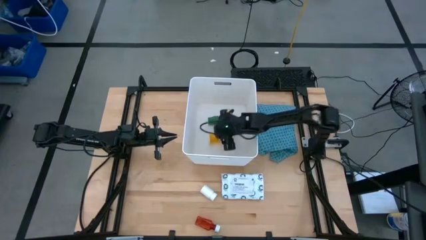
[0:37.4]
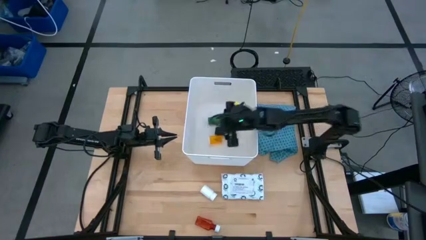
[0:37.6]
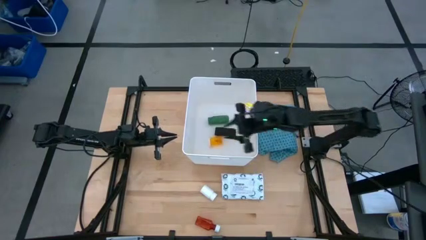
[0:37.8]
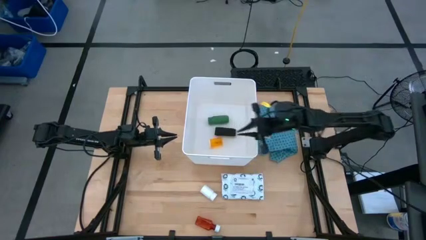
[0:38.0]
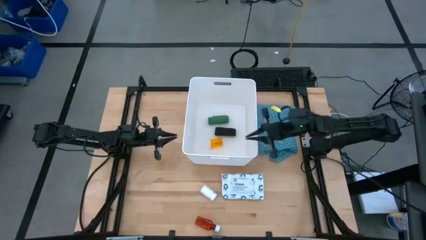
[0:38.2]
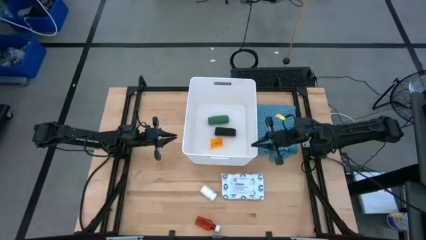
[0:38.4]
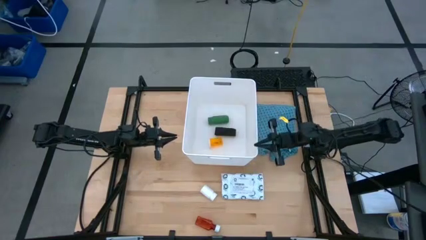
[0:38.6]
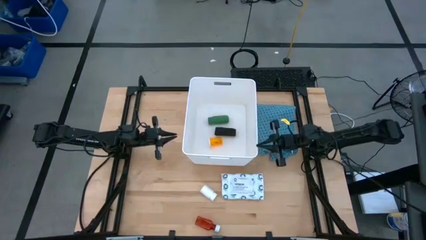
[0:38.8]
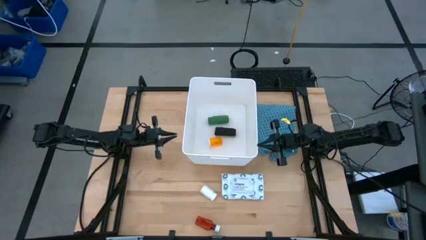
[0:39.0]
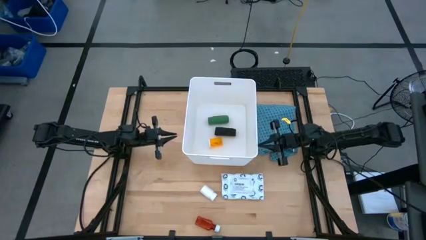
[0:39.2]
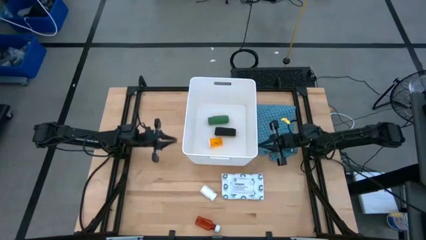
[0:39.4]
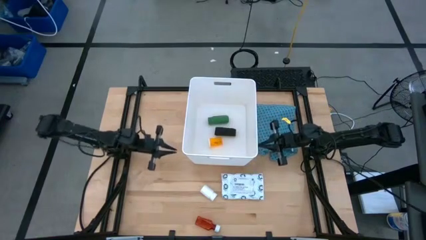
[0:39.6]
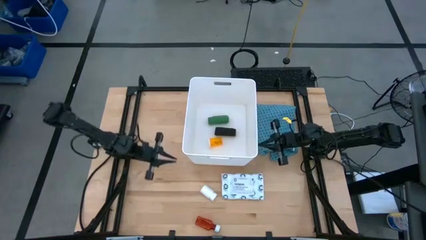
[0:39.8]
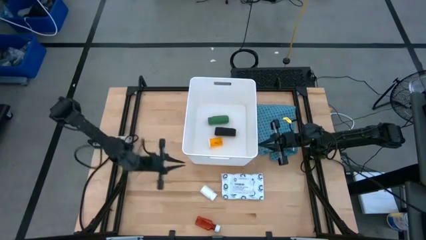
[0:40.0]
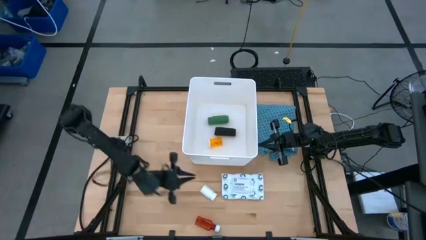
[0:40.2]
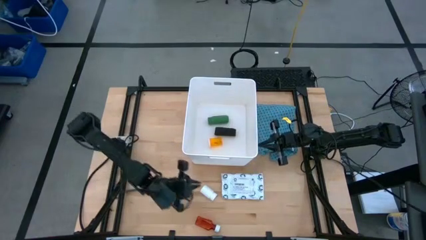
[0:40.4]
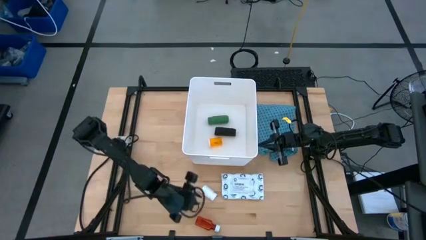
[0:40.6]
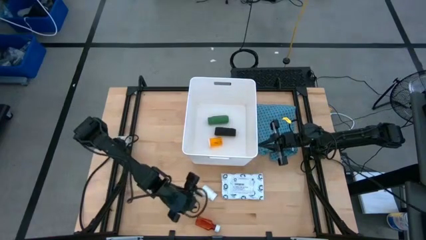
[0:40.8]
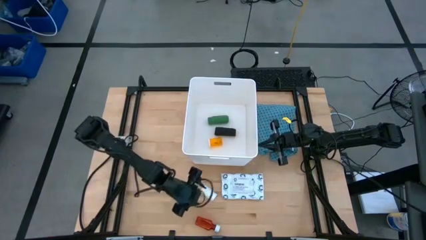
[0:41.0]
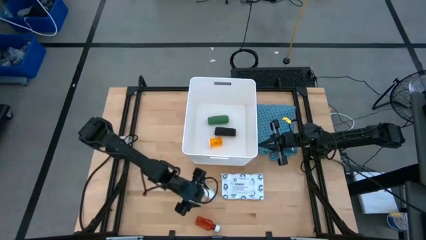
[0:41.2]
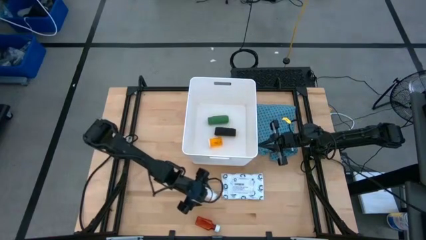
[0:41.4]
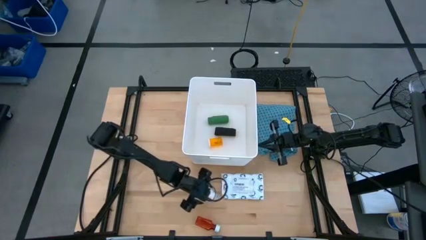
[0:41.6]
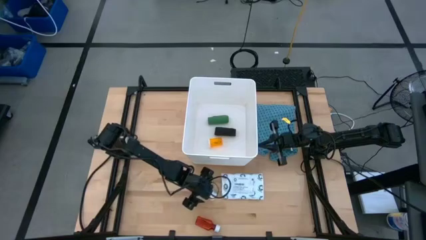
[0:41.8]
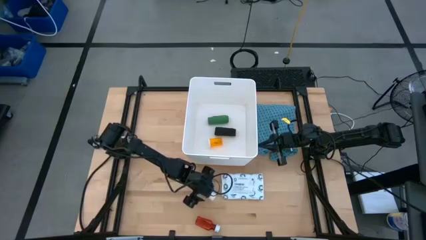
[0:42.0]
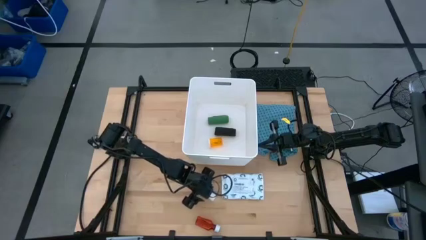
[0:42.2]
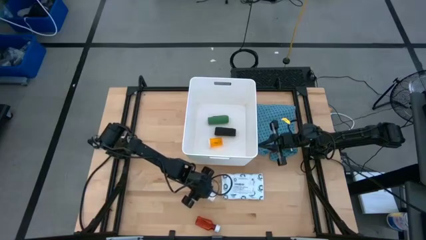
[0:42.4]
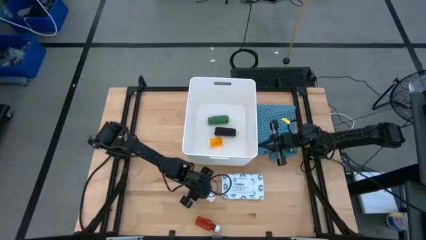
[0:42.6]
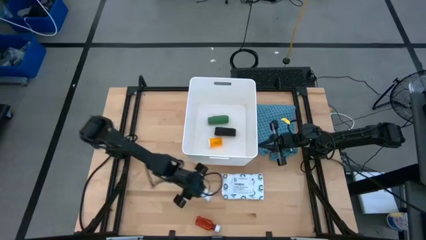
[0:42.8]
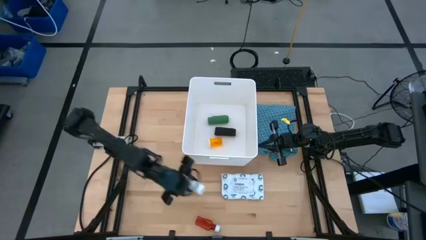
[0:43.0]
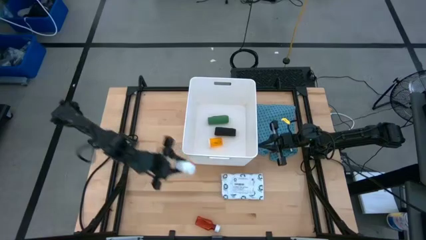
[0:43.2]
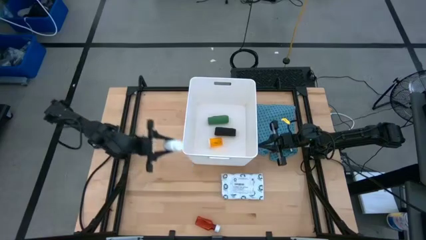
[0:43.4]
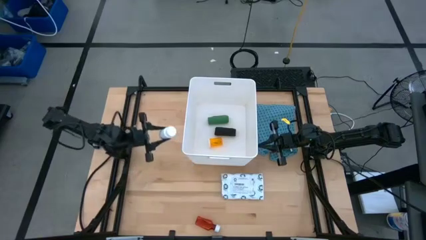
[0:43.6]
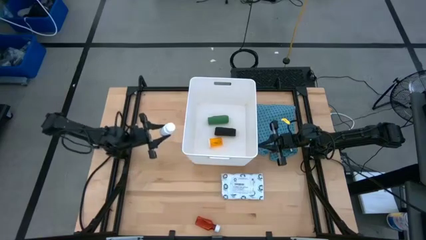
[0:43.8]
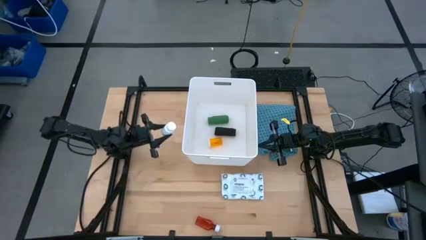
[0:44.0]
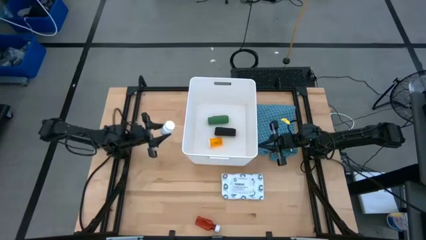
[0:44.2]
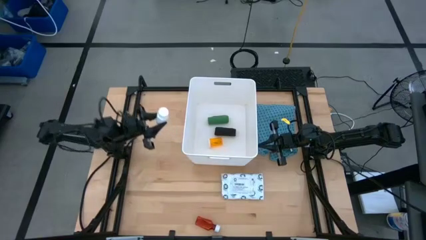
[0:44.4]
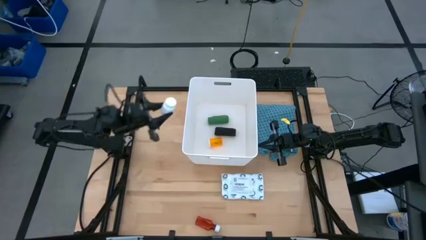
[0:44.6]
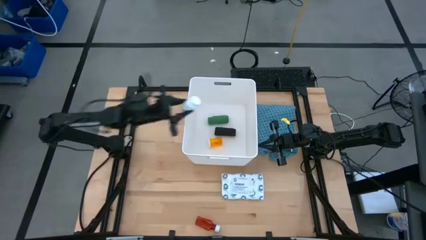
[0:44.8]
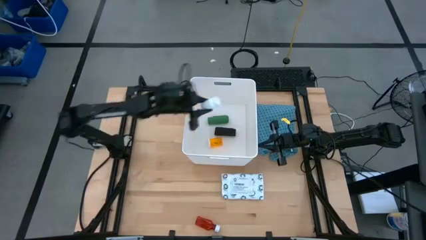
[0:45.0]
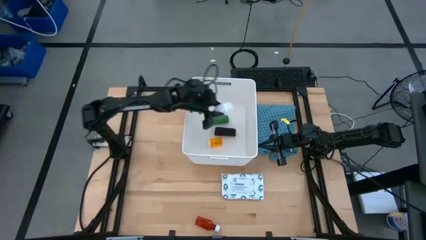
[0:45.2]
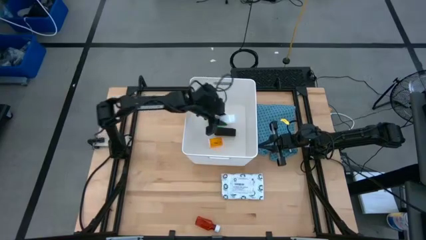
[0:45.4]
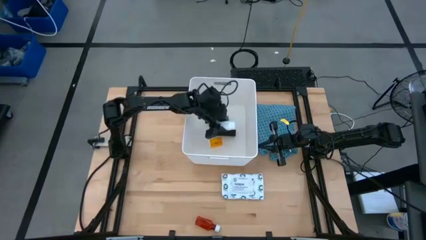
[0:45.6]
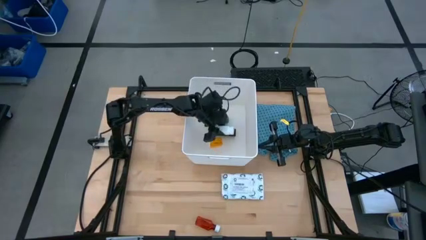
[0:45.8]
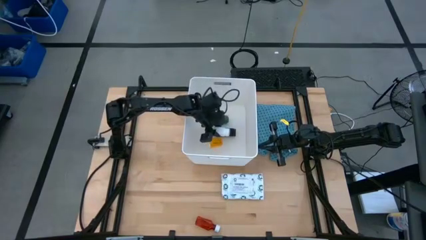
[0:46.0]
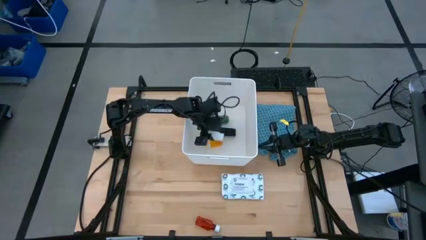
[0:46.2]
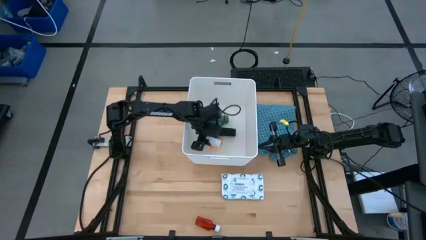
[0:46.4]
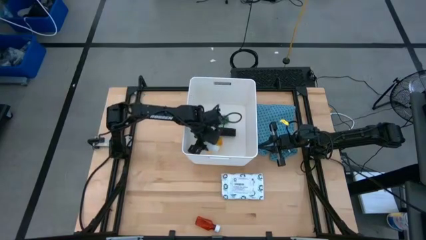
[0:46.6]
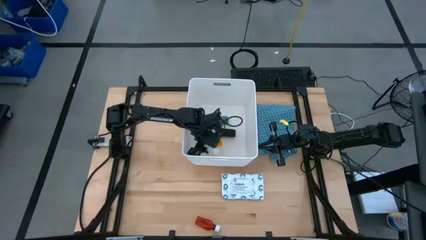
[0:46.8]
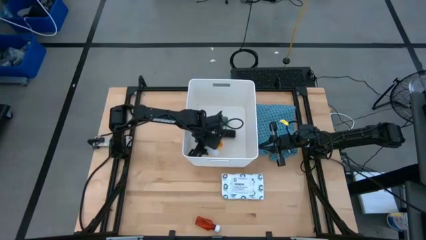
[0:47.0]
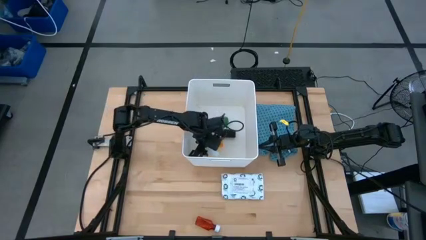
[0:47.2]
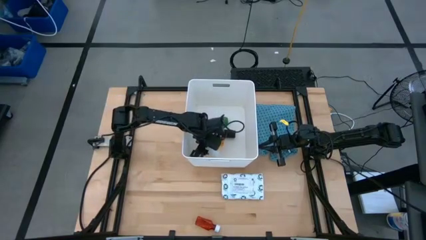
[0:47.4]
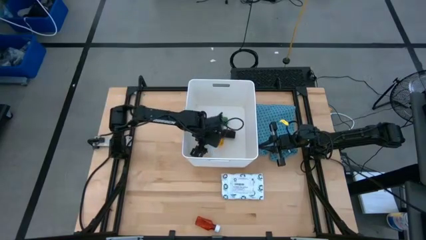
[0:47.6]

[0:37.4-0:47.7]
Task: Pick & place medical supplies in basket/bin
Put the white pill bottle into the white bin

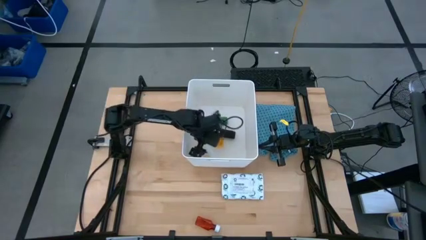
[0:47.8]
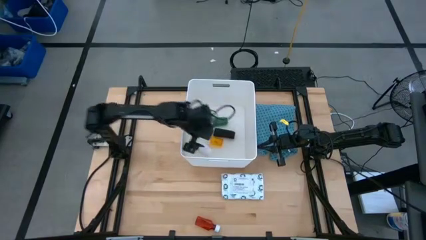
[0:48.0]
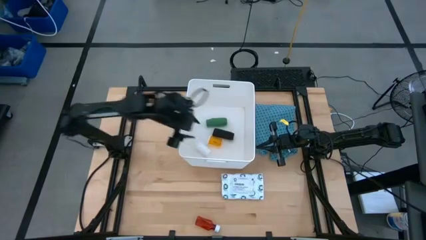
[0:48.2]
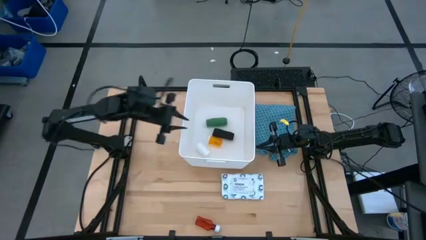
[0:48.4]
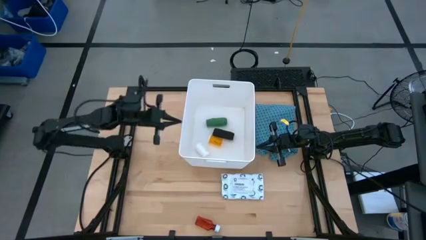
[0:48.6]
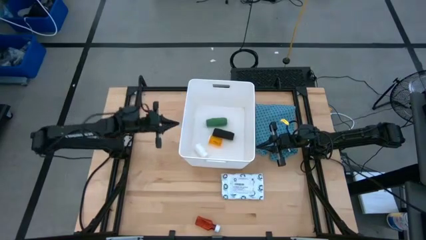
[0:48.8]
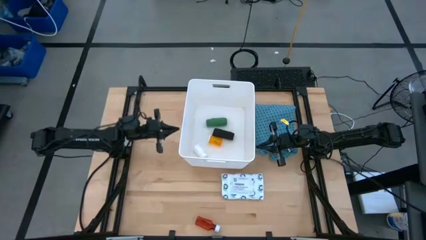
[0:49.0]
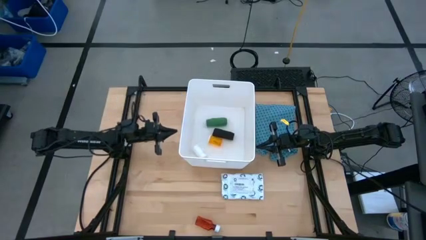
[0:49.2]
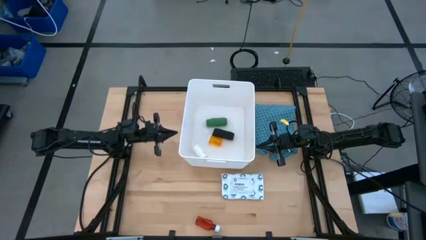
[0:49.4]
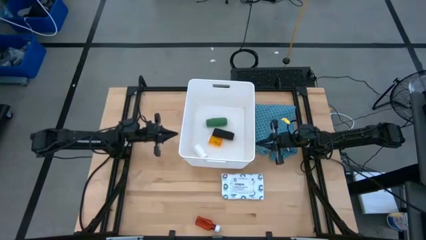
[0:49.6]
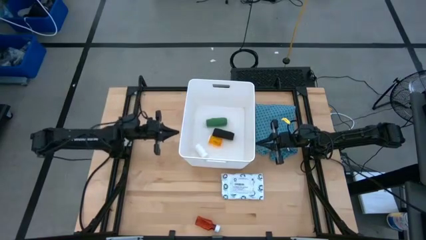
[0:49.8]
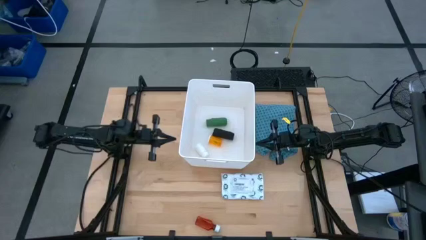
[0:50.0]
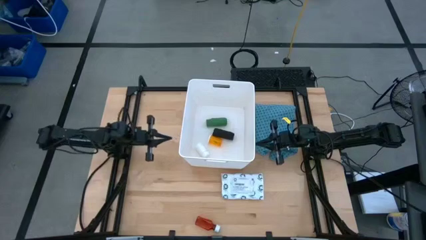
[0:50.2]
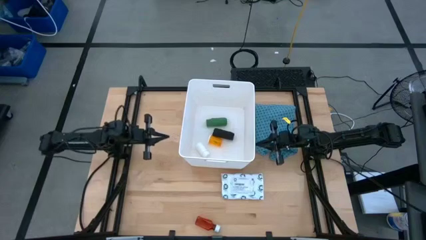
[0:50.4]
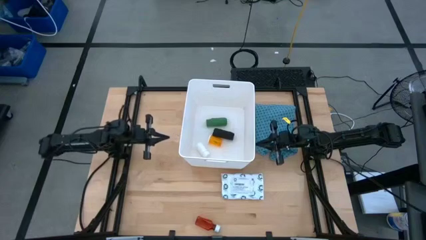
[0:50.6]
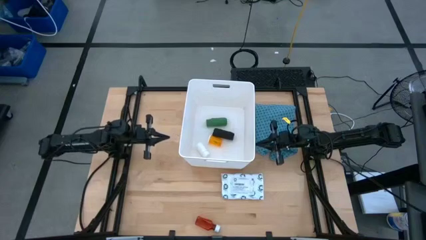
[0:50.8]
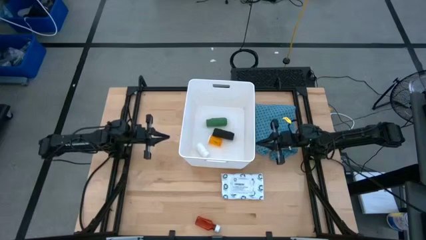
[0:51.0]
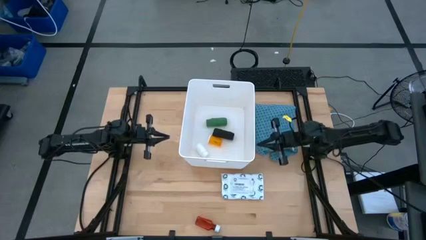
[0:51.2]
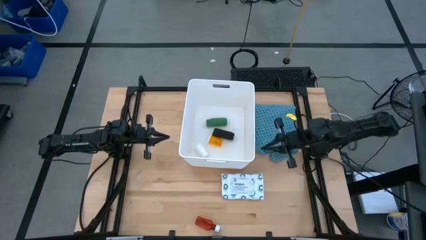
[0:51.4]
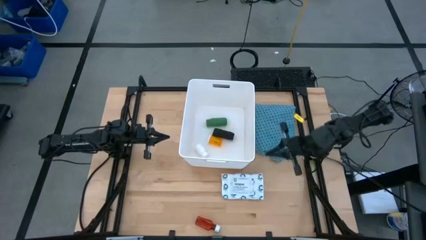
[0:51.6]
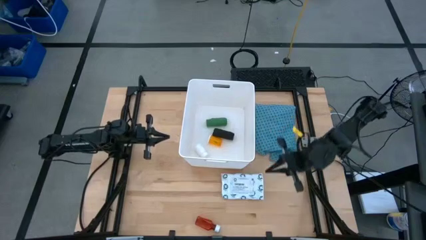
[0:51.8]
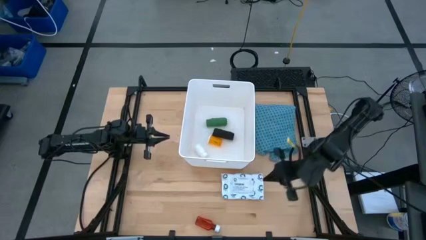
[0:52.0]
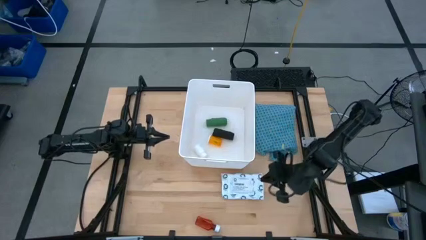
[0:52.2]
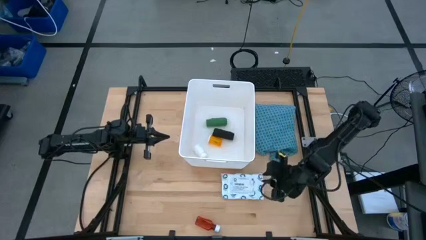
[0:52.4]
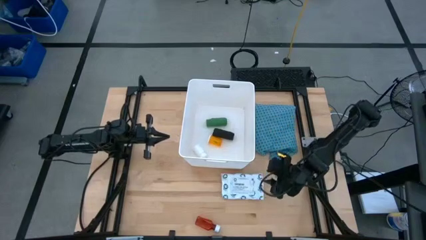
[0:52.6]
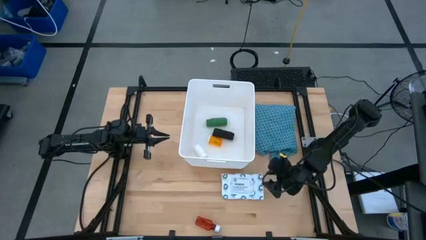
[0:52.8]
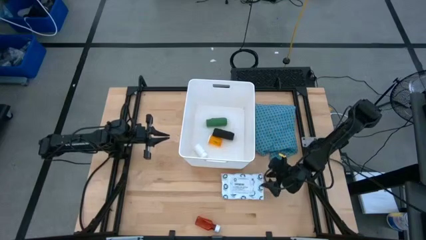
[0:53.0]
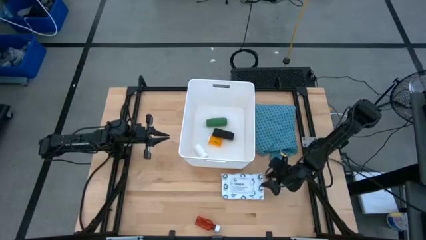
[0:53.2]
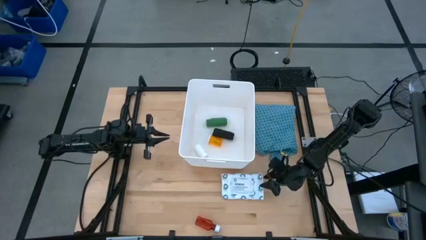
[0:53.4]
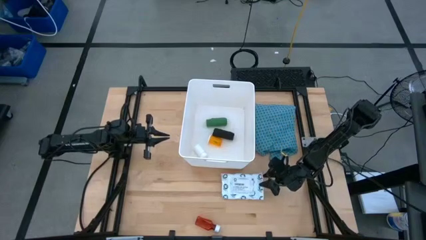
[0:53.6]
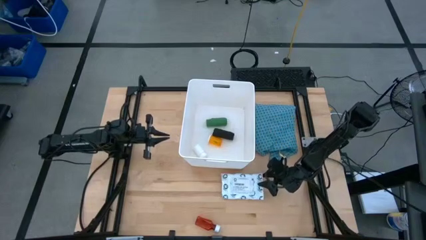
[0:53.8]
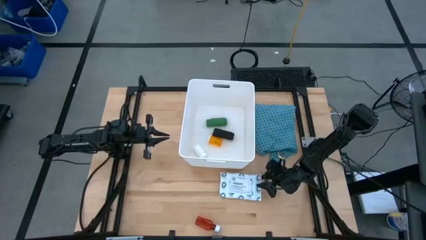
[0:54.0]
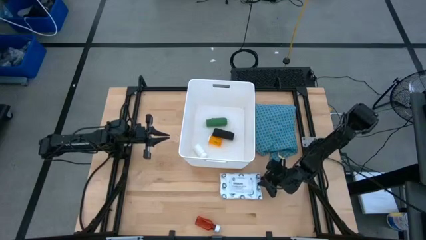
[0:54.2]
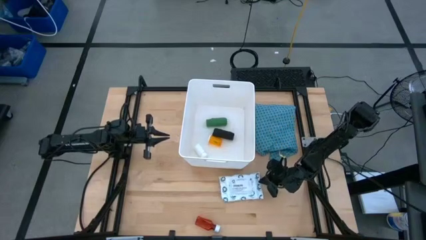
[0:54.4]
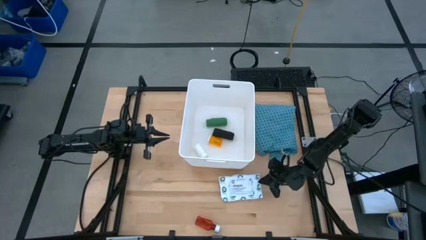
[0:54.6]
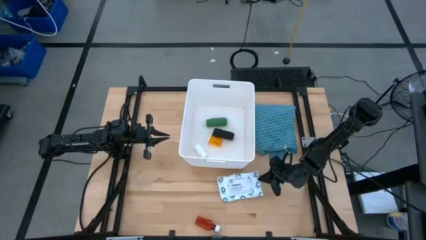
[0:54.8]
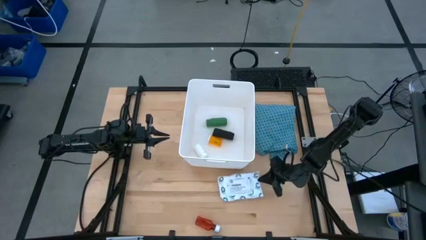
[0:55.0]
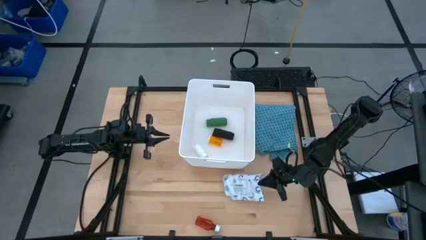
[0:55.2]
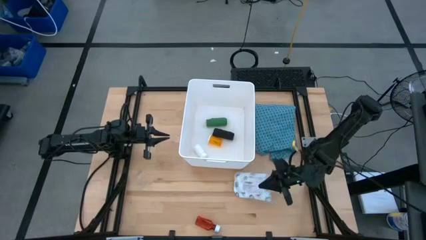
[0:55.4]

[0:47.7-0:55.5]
Put the white mailer bag into the white bin
